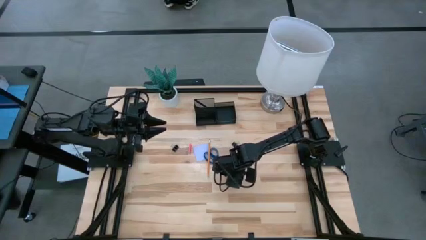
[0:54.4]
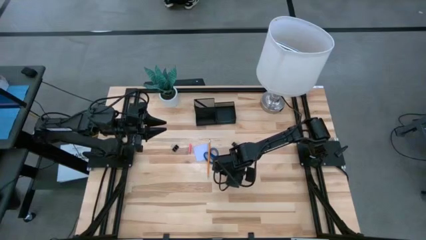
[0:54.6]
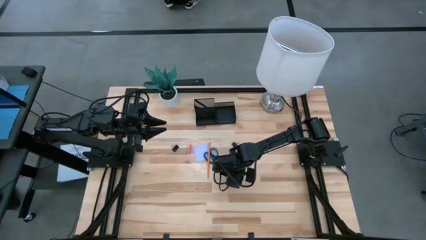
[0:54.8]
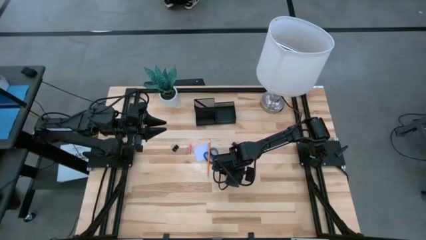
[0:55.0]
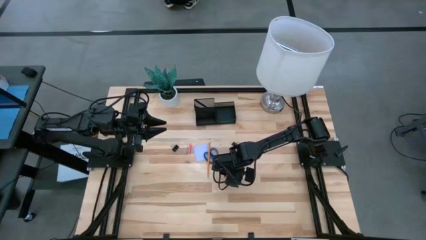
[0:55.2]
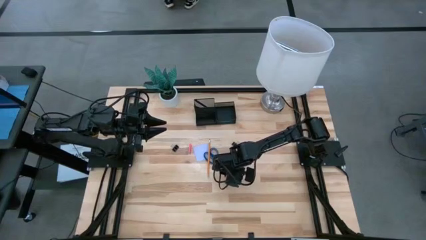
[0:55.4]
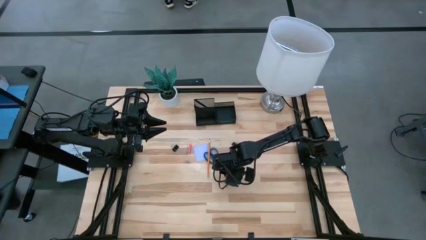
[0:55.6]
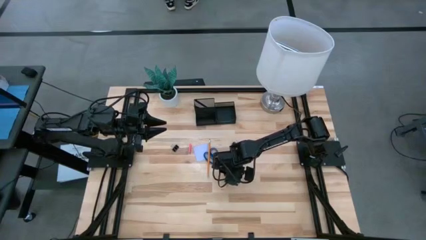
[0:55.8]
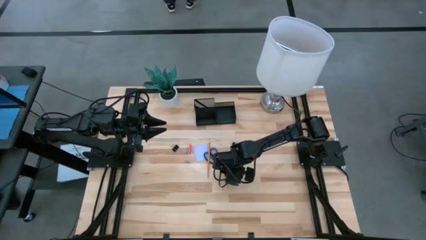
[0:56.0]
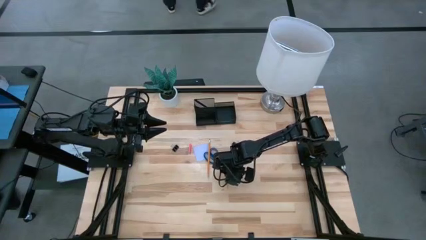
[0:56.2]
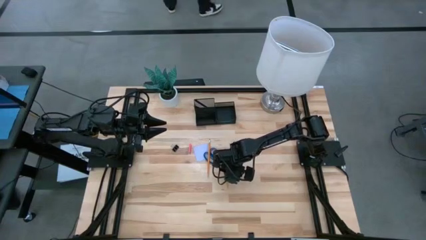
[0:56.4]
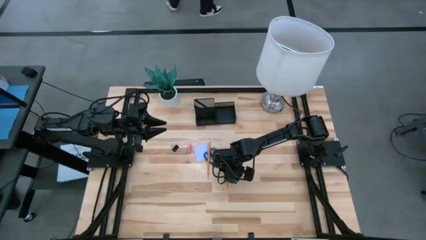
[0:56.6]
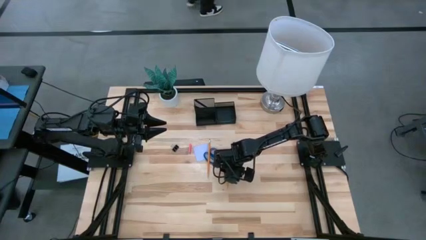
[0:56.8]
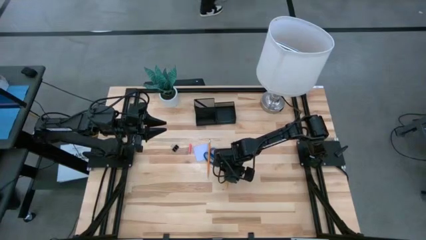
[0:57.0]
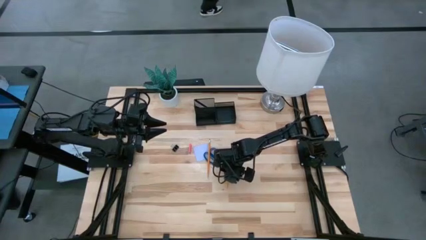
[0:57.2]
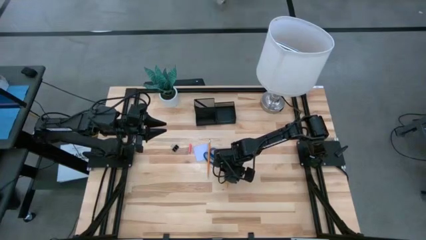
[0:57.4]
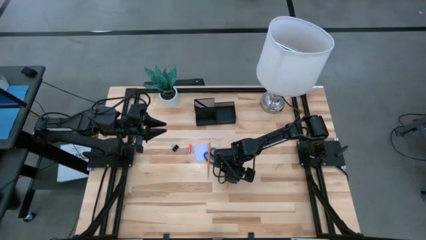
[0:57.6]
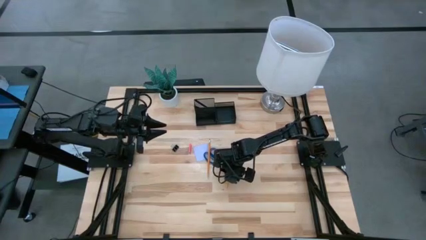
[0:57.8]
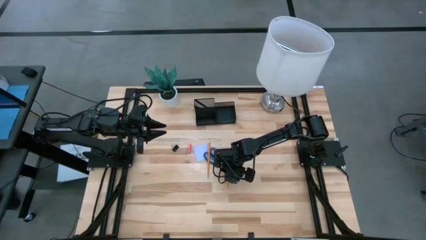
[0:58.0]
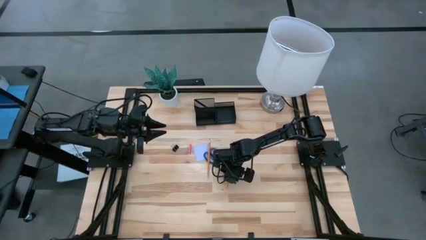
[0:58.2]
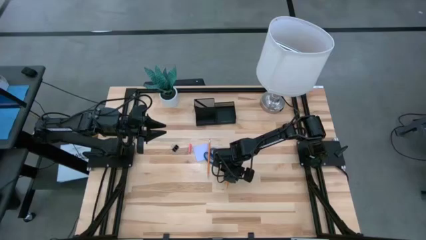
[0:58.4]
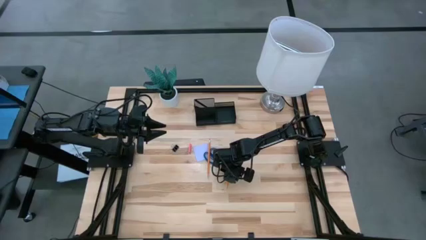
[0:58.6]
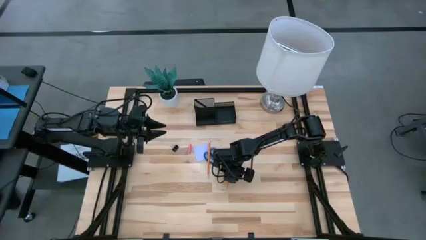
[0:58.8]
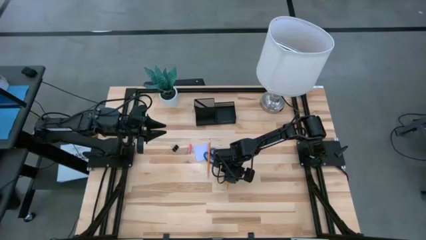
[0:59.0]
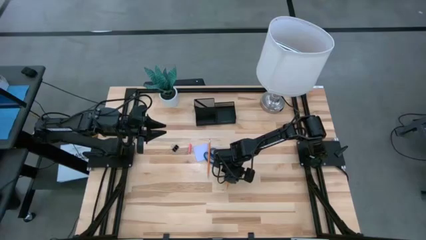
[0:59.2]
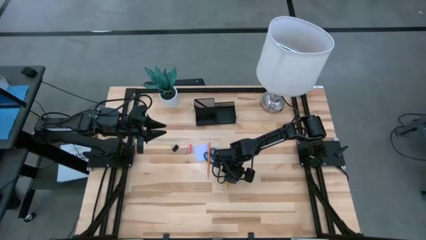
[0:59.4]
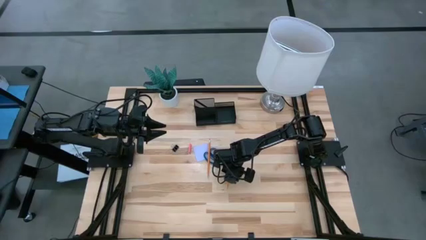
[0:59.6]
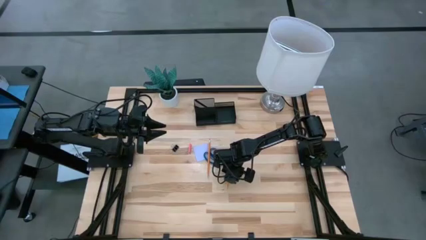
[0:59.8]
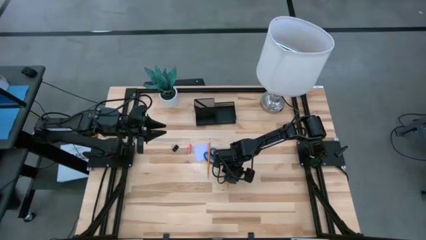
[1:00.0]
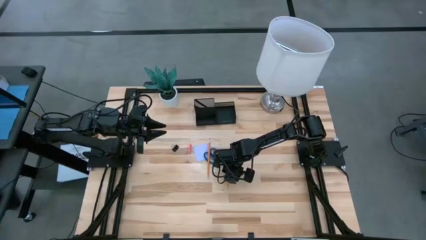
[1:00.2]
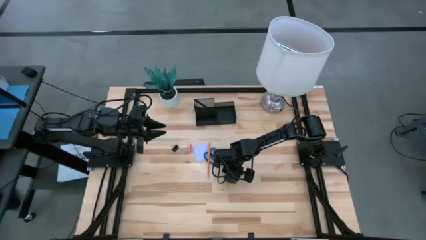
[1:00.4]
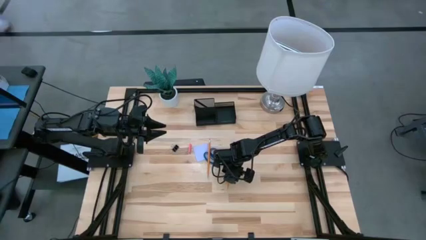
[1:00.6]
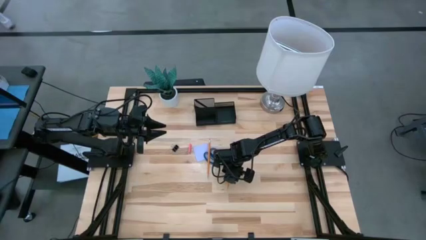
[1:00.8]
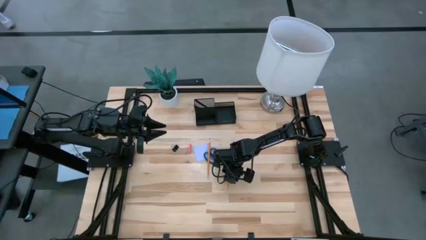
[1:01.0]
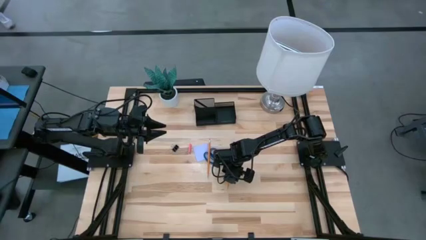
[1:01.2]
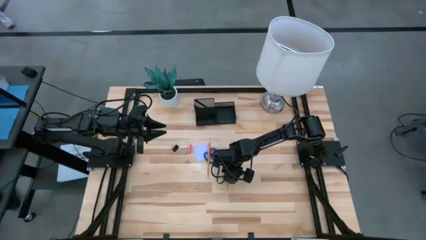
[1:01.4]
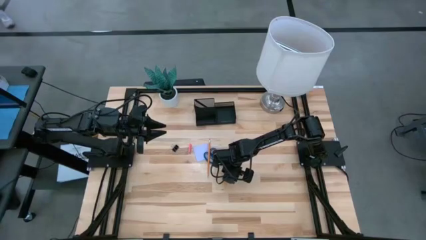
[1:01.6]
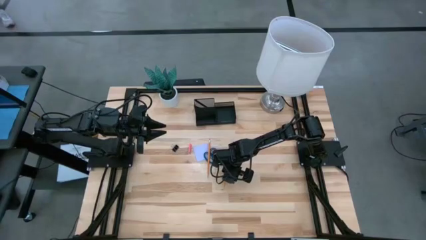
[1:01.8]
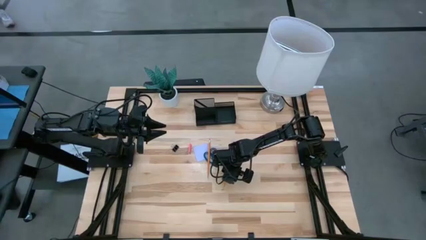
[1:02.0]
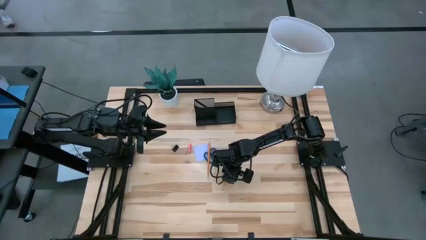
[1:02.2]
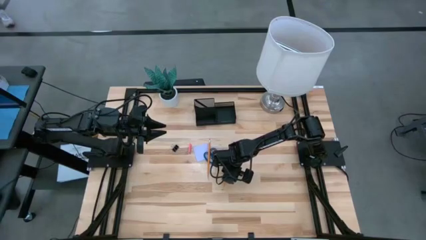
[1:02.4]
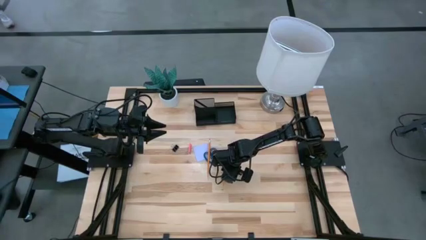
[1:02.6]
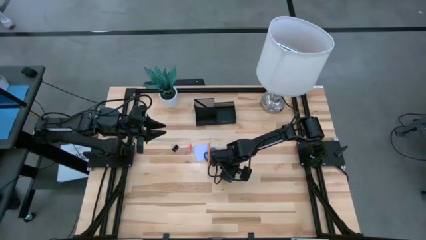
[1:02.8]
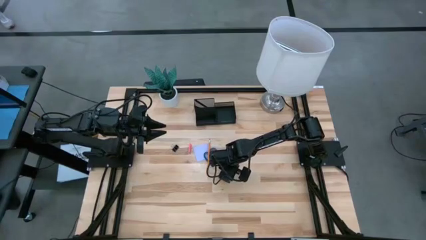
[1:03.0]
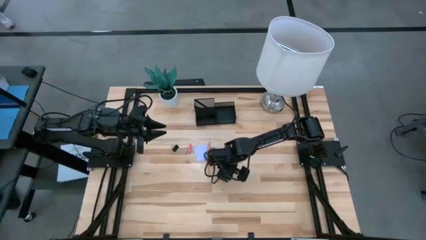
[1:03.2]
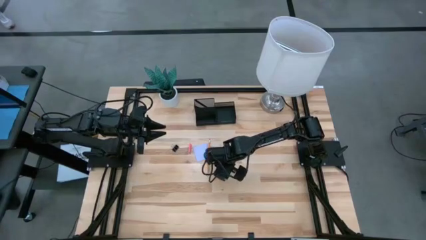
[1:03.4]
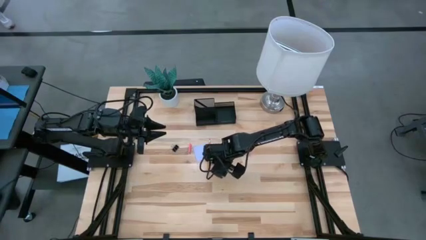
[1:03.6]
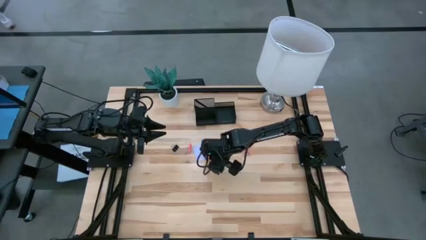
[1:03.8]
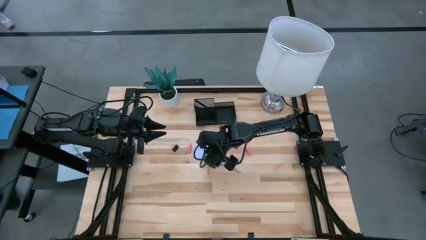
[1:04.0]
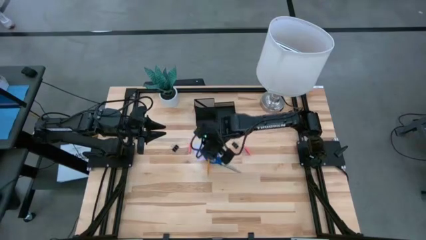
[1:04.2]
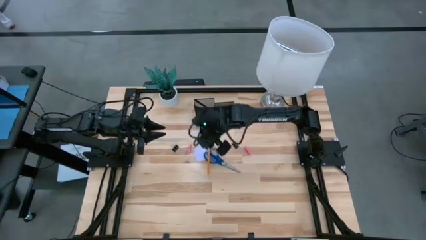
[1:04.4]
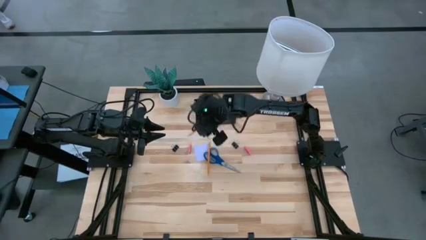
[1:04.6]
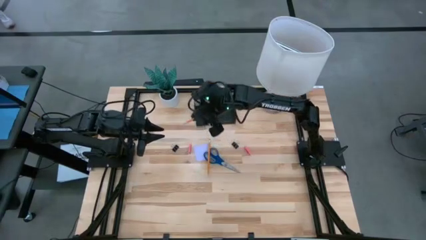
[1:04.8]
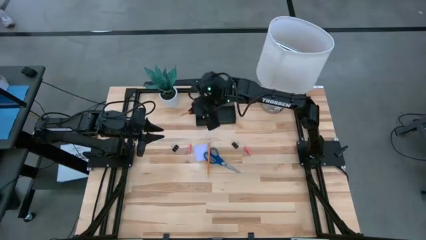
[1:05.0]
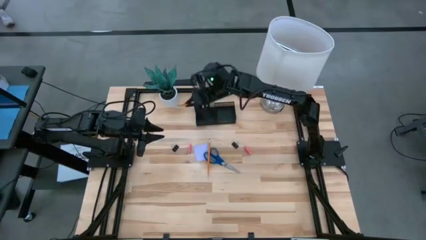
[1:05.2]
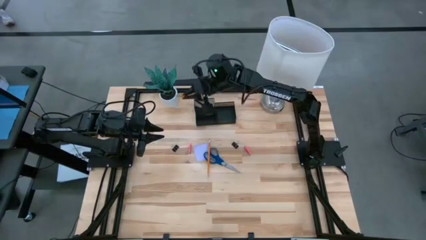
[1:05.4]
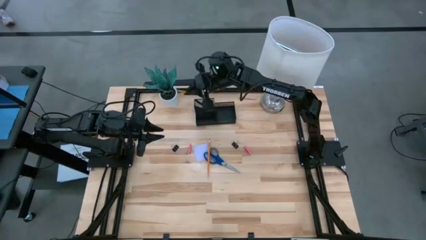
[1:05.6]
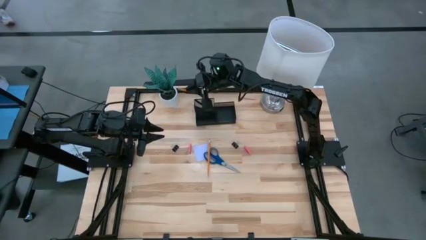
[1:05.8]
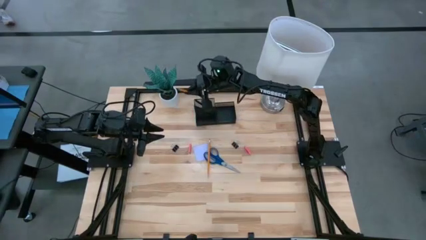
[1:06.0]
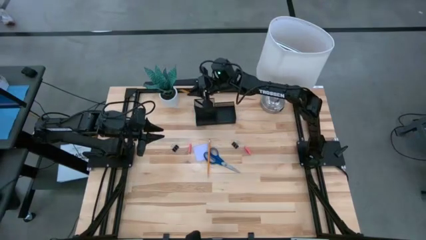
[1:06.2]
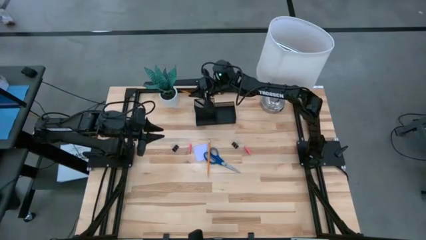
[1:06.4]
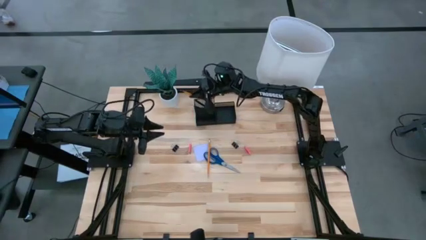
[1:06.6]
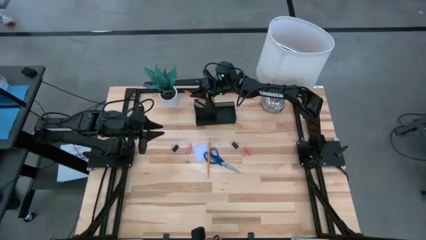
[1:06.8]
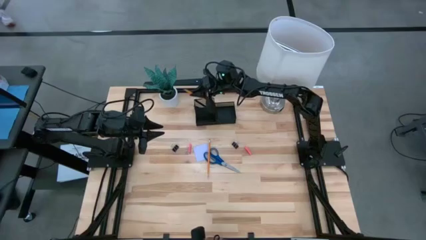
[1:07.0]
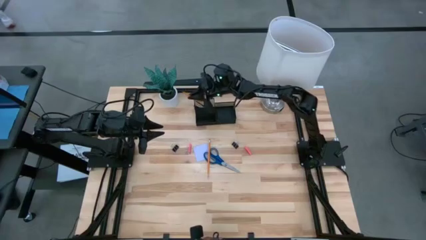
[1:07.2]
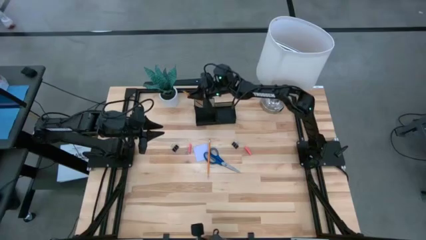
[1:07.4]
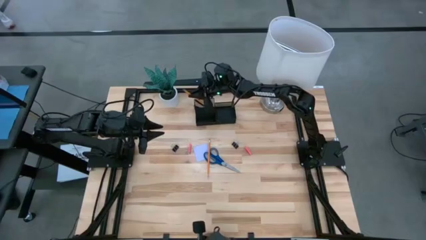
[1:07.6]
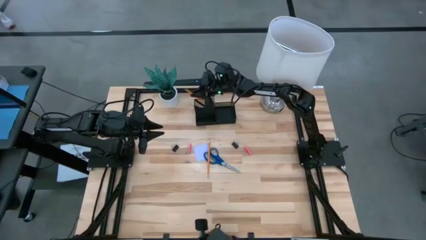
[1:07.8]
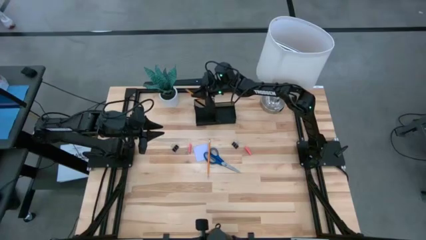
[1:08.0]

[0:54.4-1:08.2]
Task: Pick and place office supplies into organizer
Put the right pencil into the desk organizer
